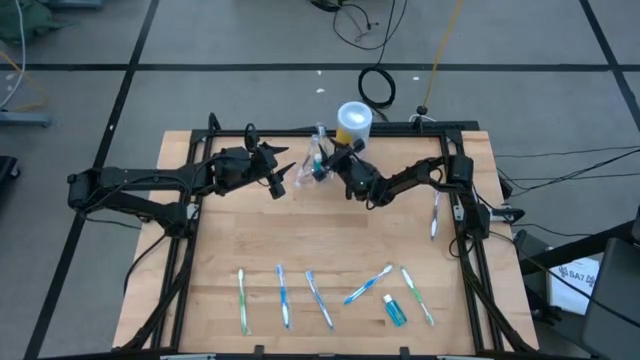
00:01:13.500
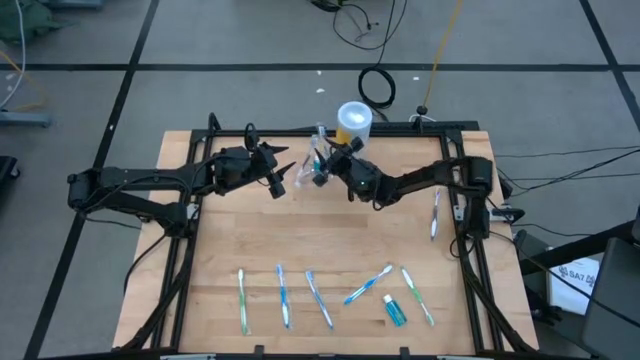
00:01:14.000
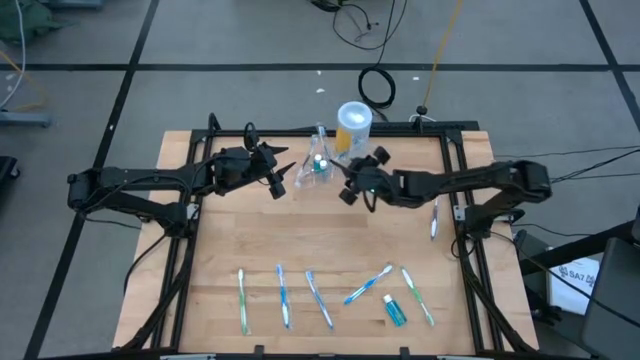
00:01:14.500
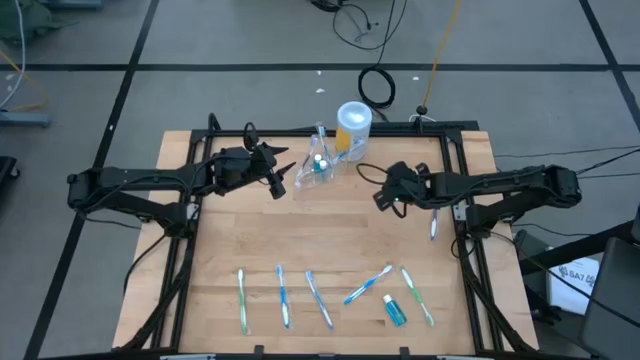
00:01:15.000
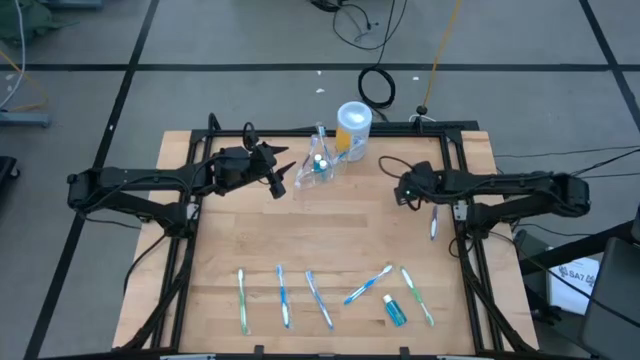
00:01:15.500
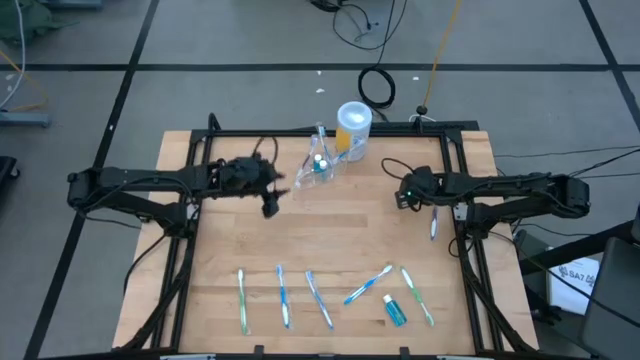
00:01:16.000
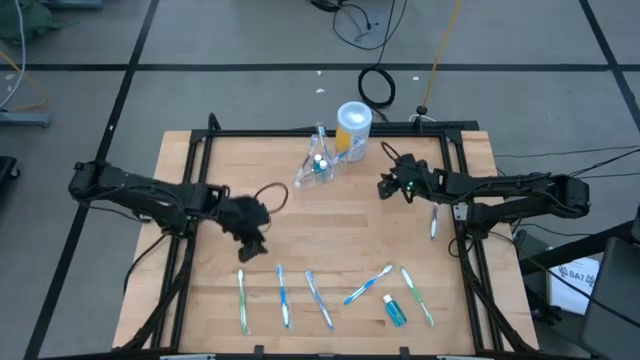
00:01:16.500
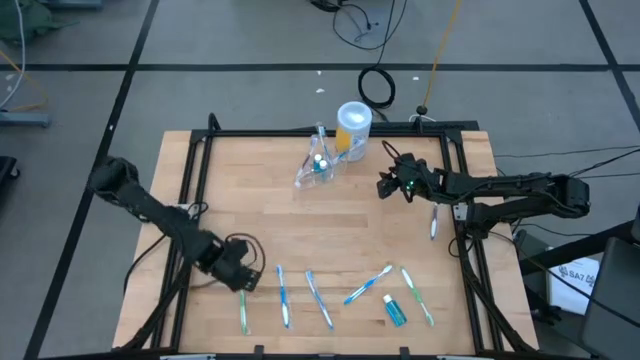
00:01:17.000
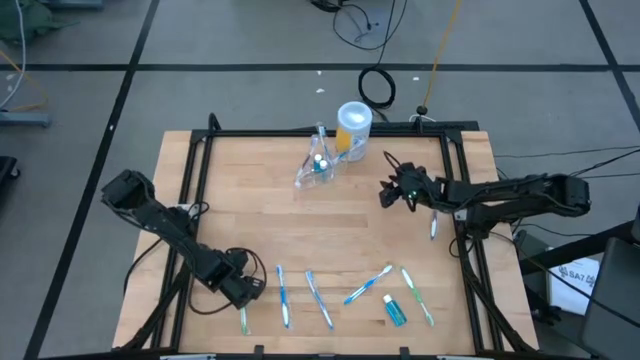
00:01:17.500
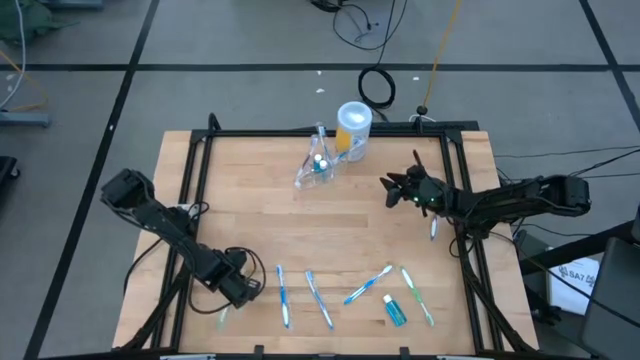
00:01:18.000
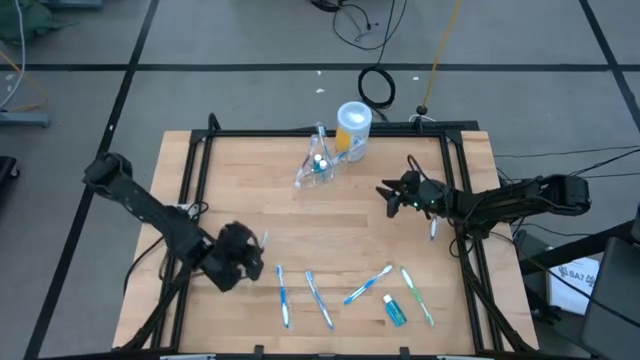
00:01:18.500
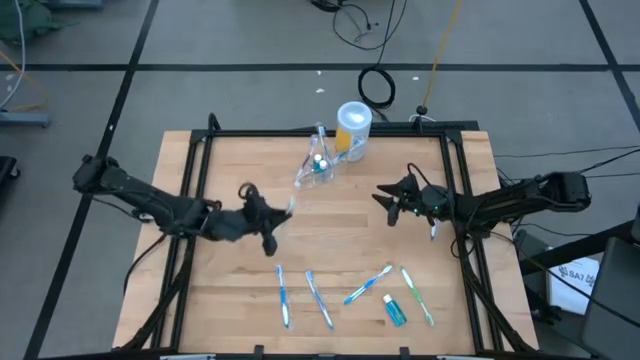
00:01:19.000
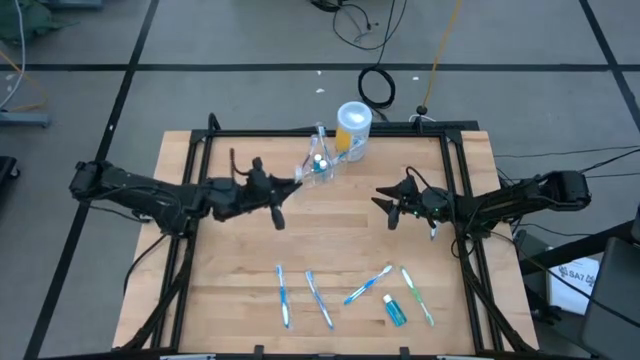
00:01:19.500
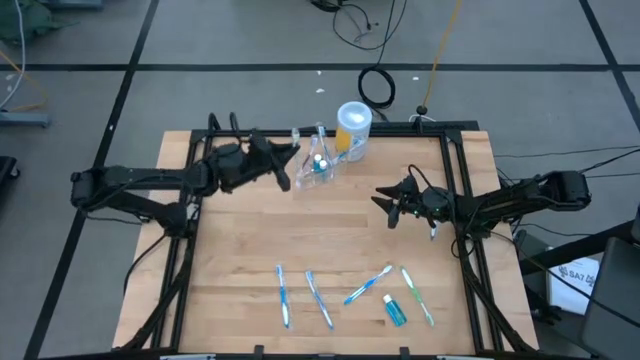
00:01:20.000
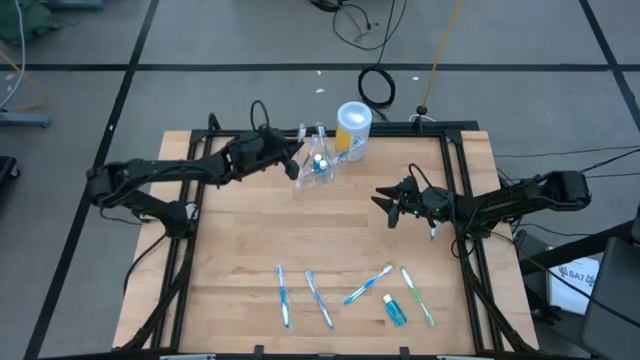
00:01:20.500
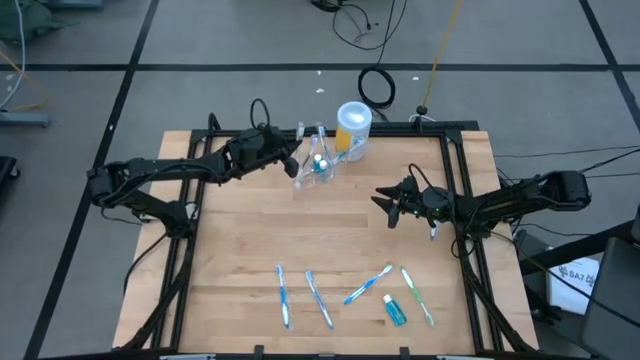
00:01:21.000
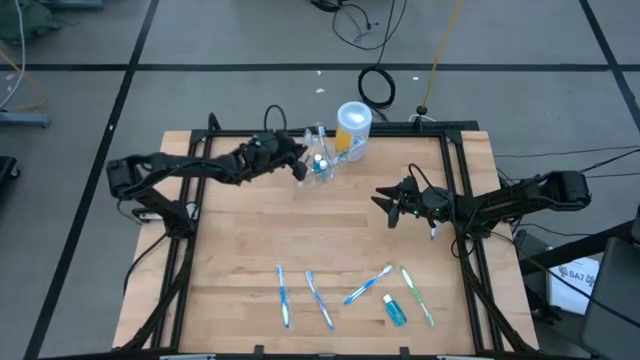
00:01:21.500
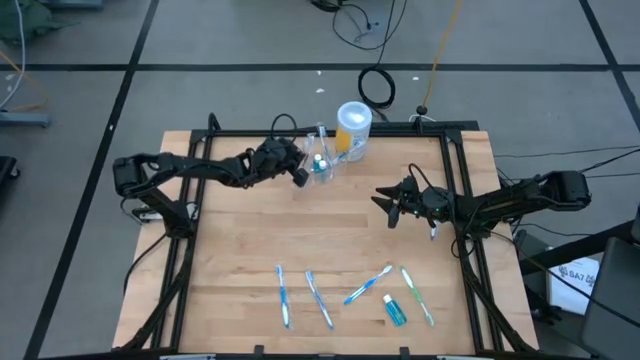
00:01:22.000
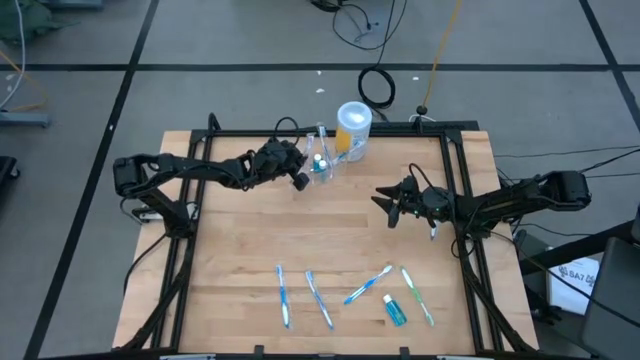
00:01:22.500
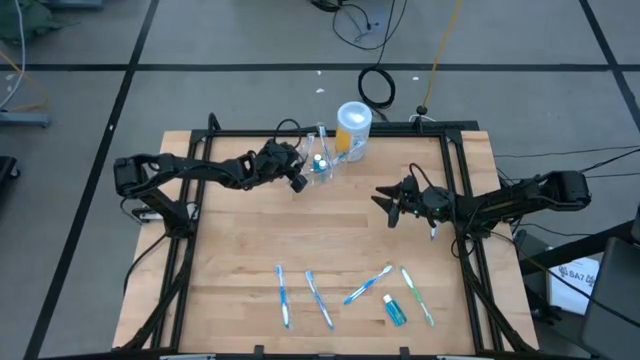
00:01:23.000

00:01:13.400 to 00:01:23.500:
Task: Pick & Place toothbrushing station
Put the left green toothbrush into the left section of the transparent organizer

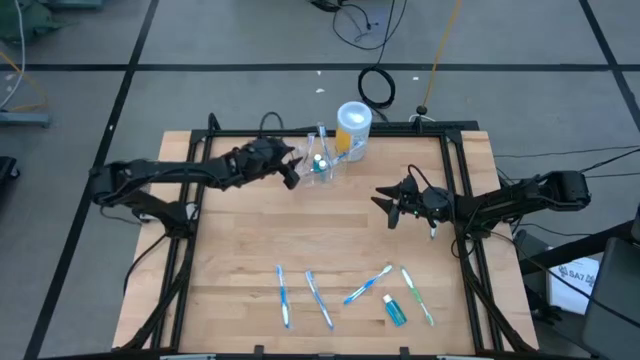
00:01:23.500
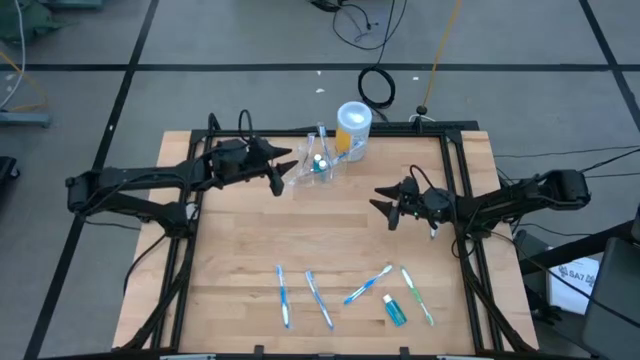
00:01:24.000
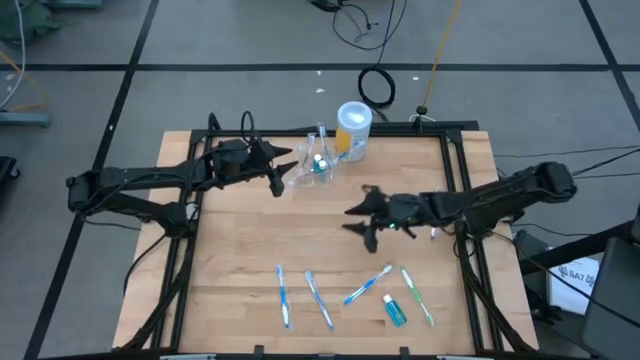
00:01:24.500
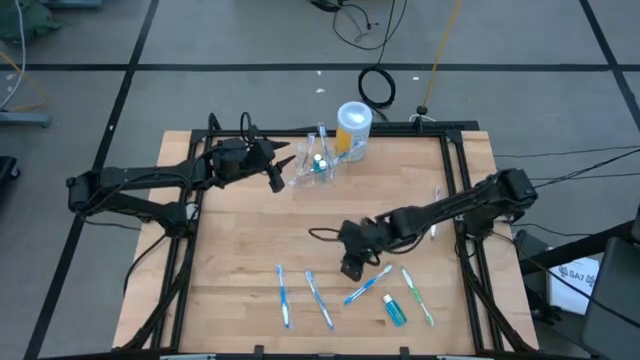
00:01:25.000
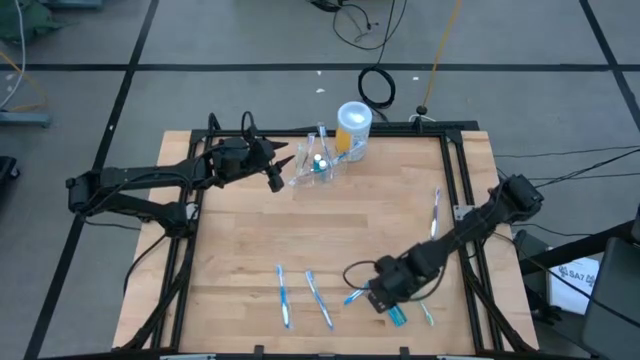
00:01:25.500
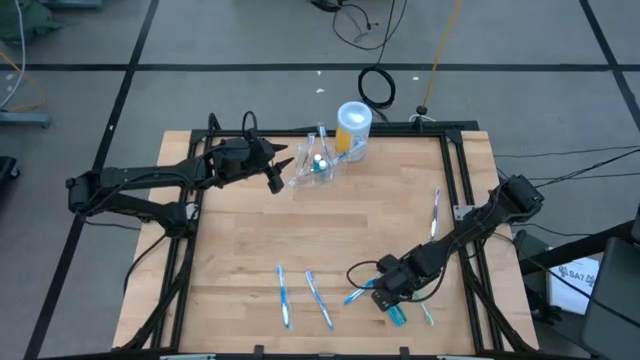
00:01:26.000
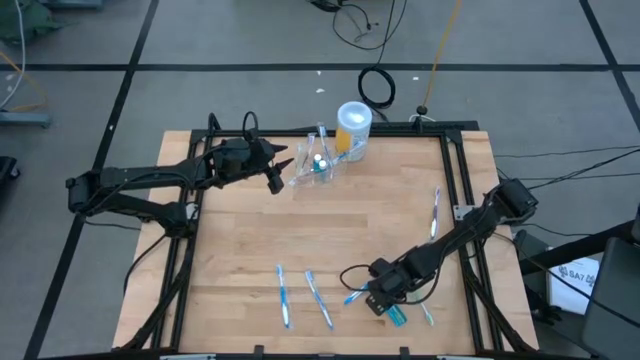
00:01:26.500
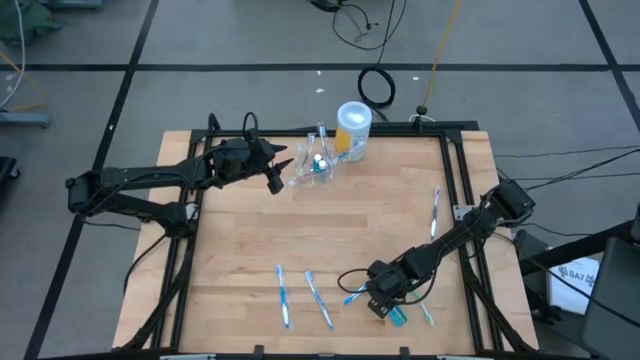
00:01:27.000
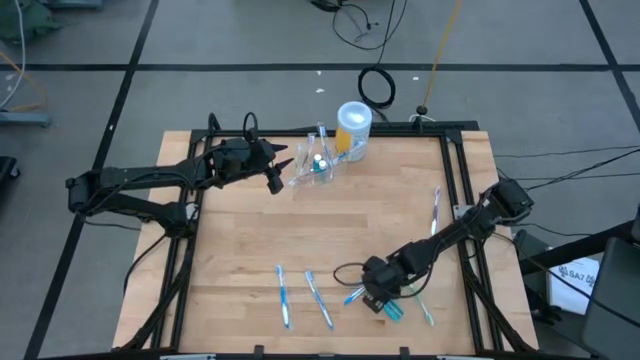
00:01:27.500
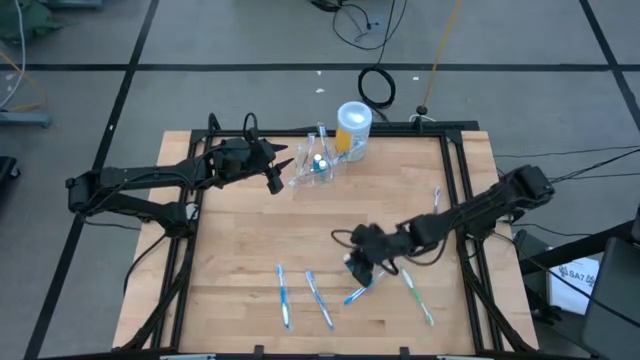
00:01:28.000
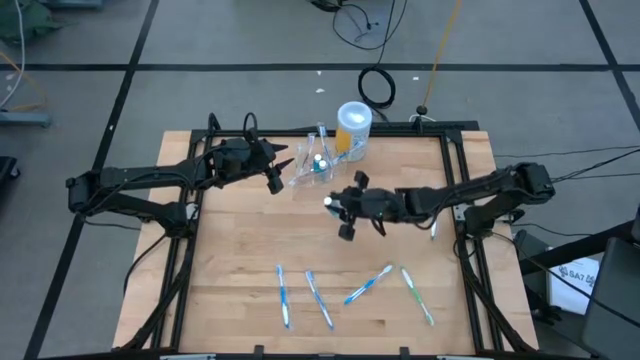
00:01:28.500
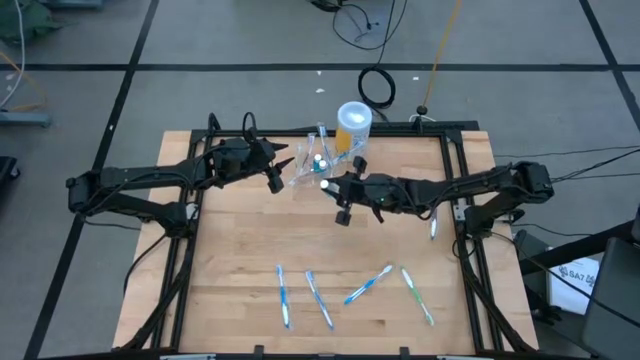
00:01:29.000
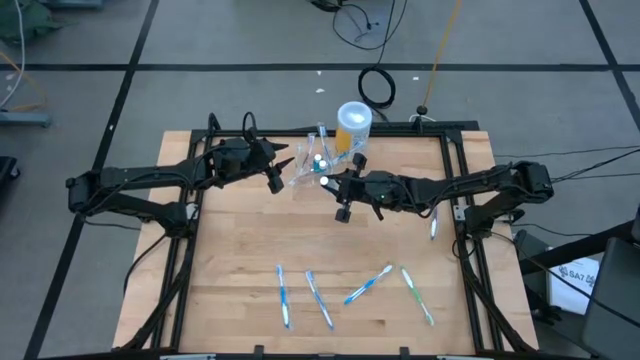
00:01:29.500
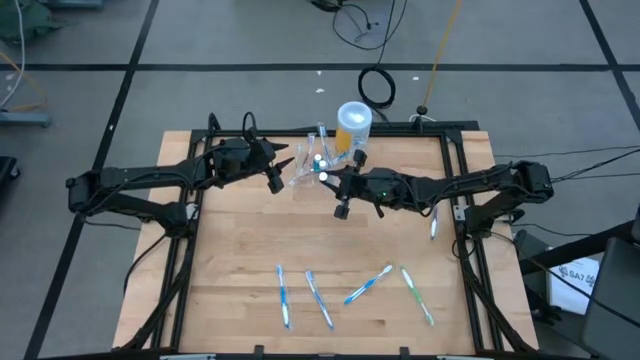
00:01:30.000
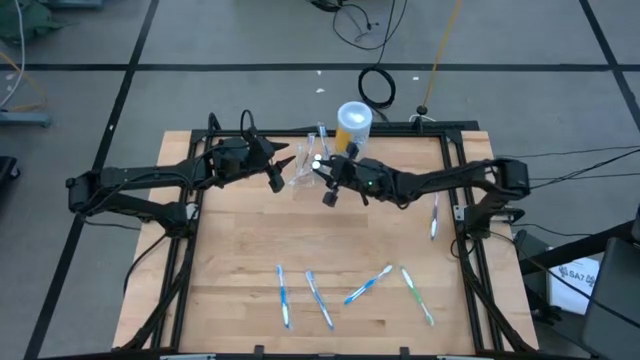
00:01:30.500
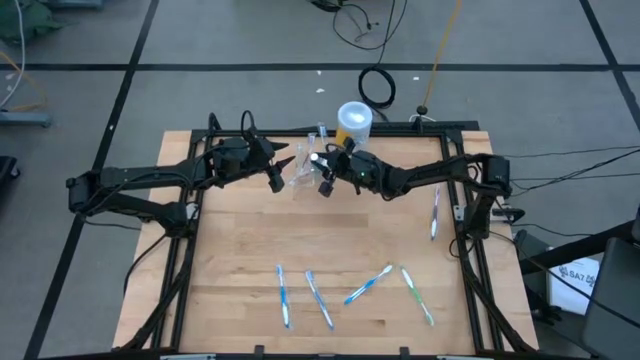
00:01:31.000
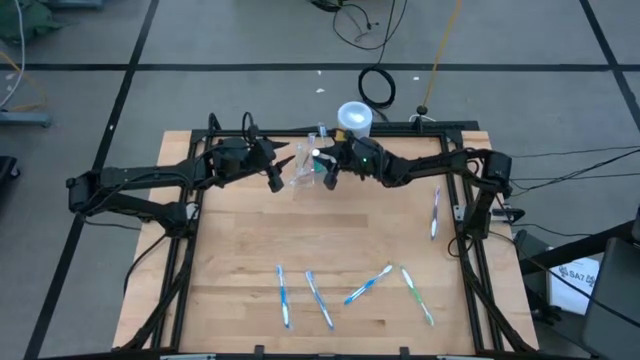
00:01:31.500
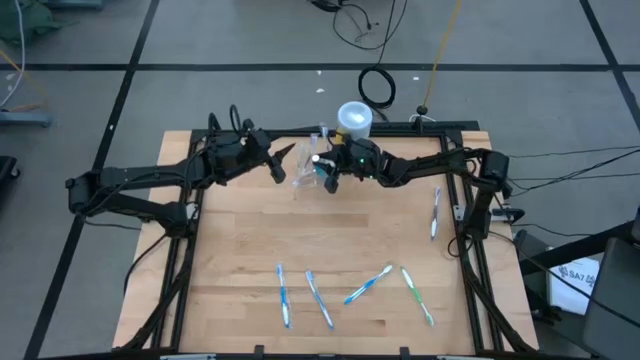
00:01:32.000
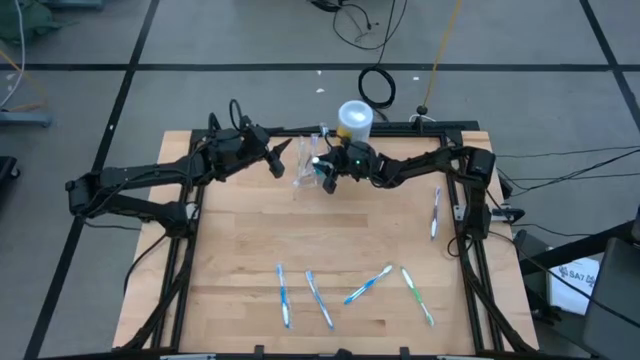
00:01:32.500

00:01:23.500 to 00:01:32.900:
Put the blue mouthwash into the middle section of the transparent organizer

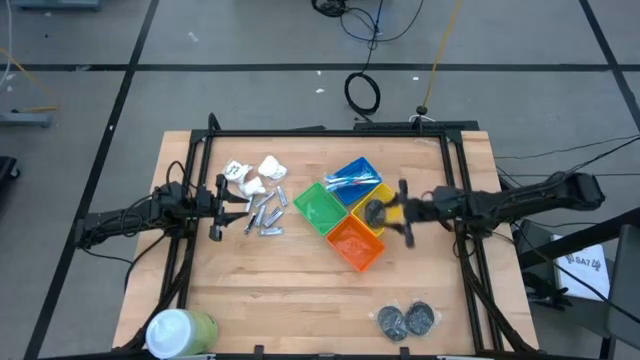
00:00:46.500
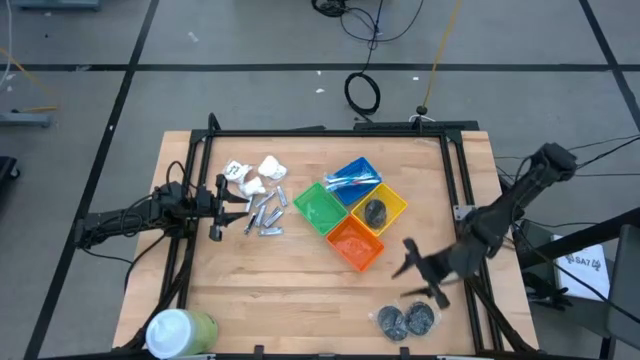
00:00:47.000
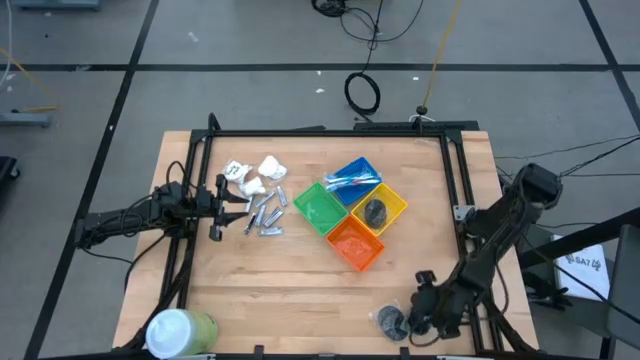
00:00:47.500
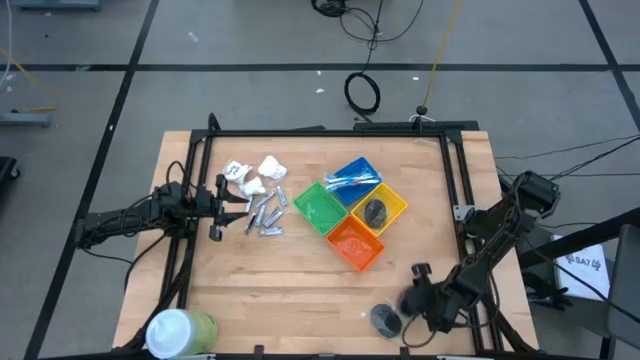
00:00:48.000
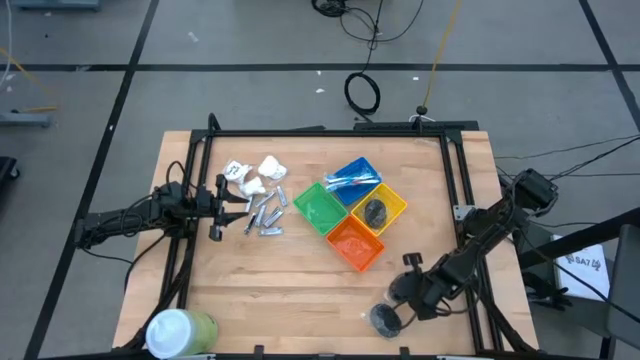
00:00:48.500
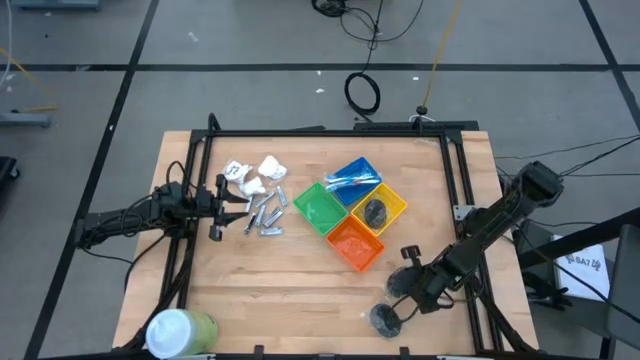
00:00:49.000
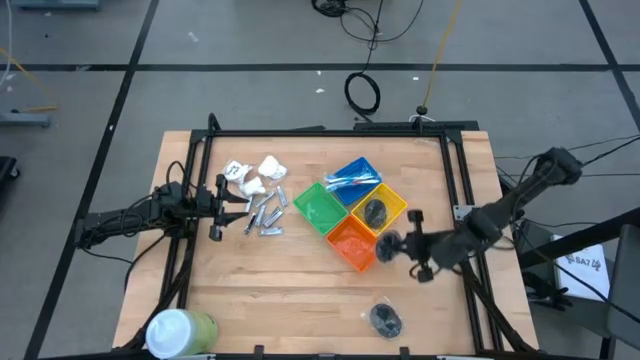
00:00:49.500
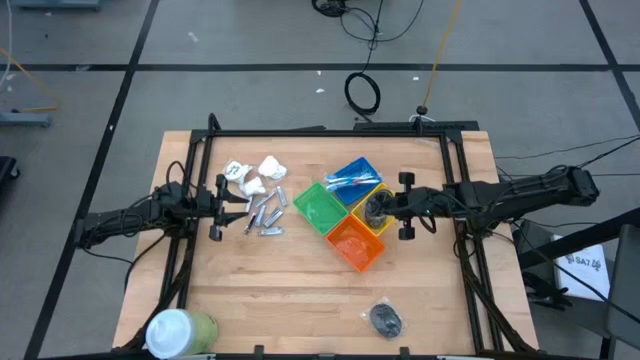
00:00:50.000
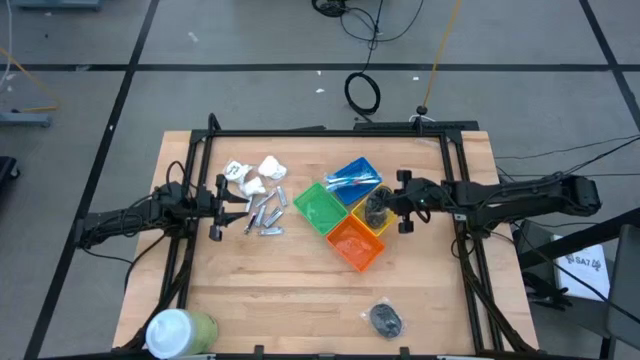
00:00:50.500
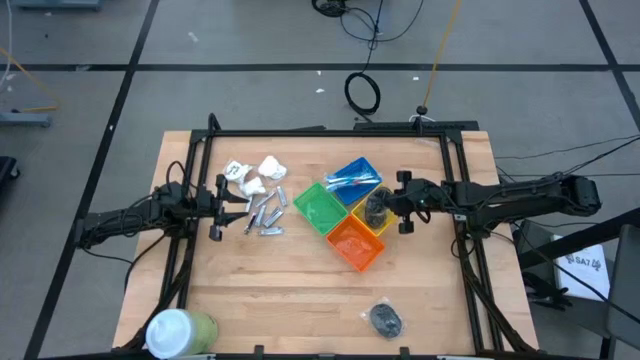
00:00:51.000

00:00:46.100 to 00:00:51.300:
Task: Pick & Place Travel size toiletries
Put the black hairbrush into the yellow bin
